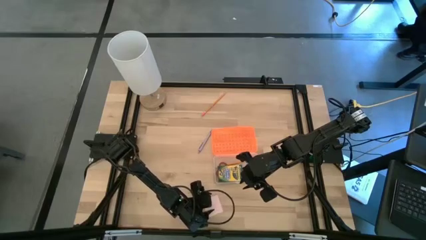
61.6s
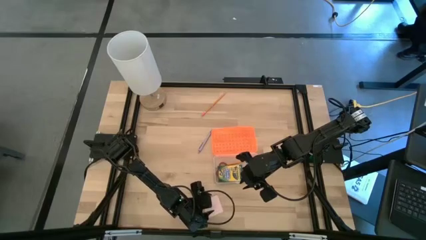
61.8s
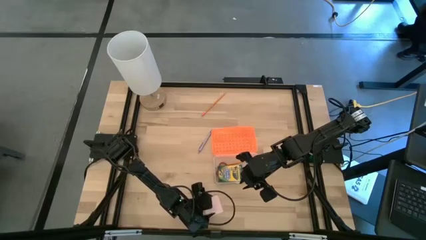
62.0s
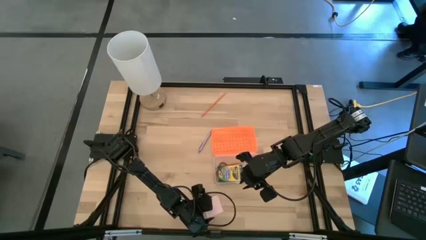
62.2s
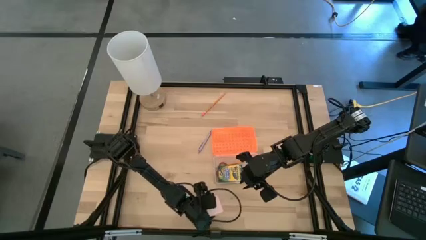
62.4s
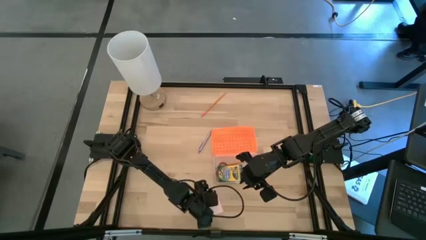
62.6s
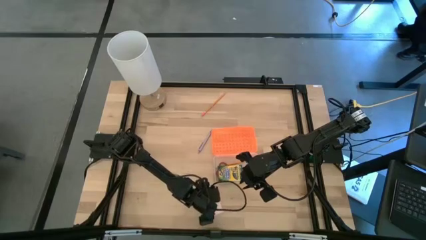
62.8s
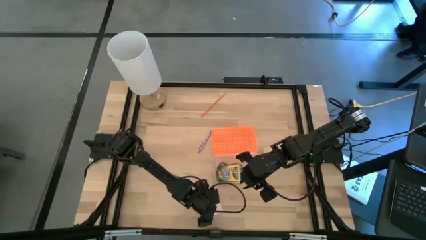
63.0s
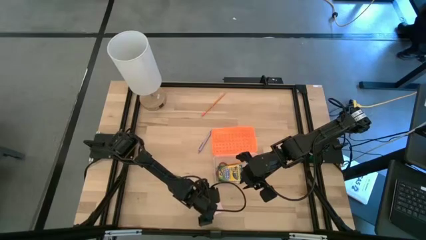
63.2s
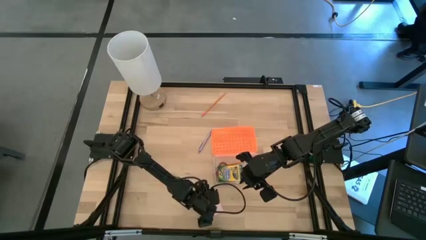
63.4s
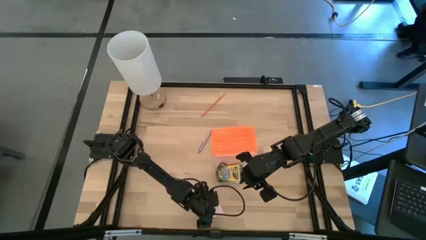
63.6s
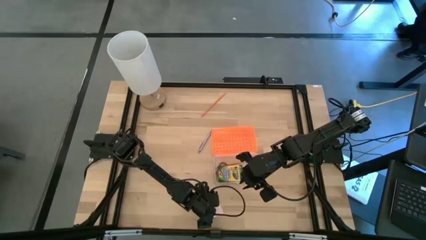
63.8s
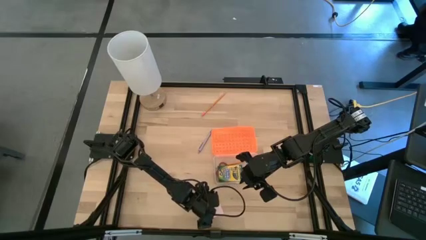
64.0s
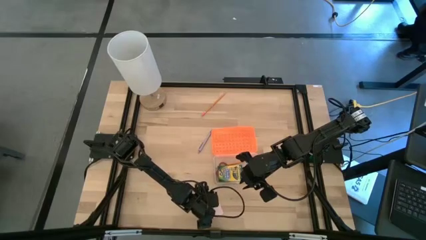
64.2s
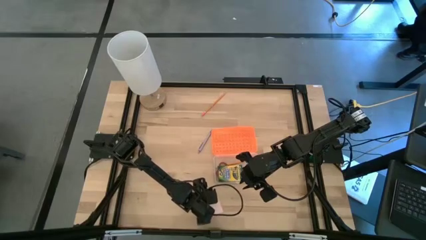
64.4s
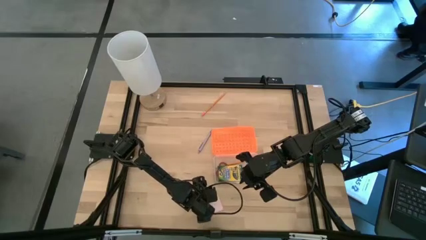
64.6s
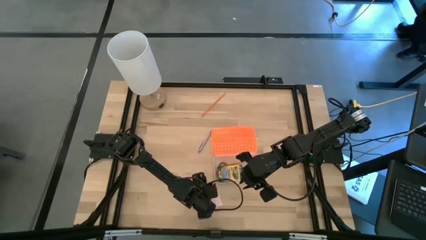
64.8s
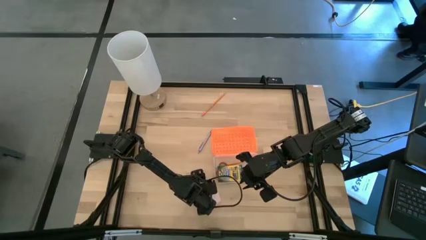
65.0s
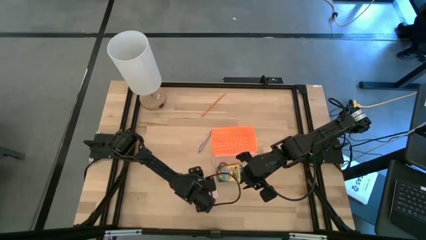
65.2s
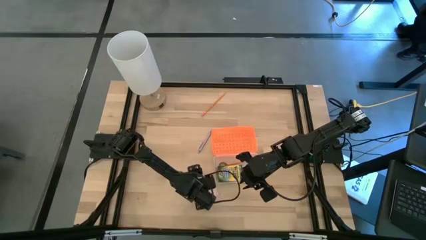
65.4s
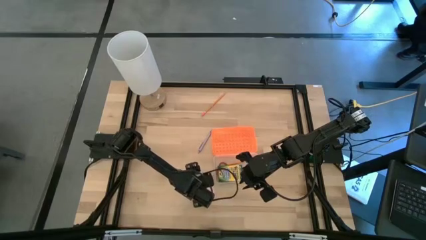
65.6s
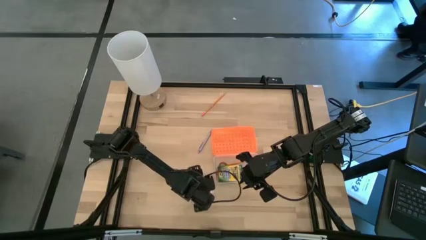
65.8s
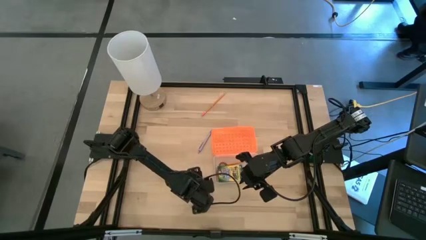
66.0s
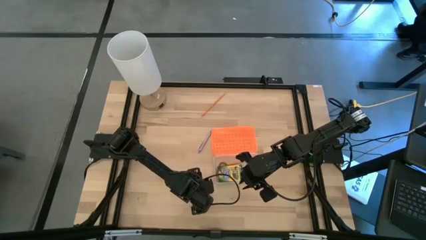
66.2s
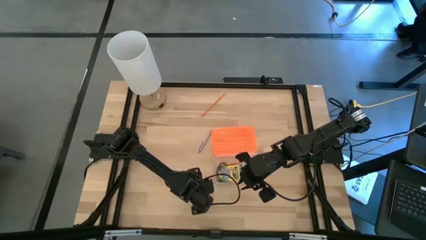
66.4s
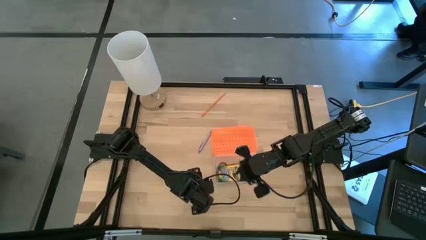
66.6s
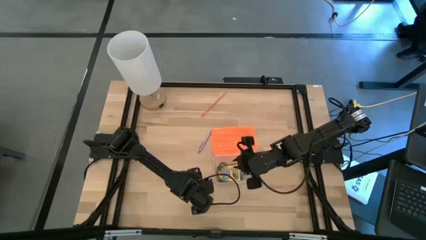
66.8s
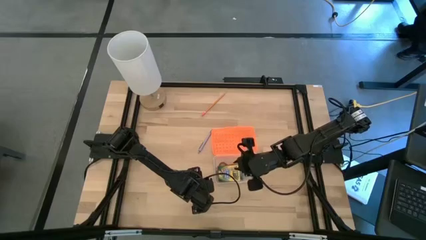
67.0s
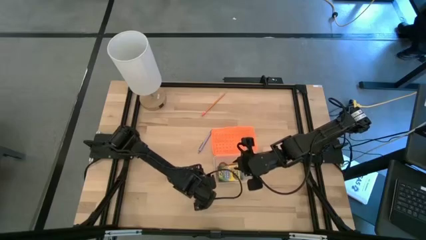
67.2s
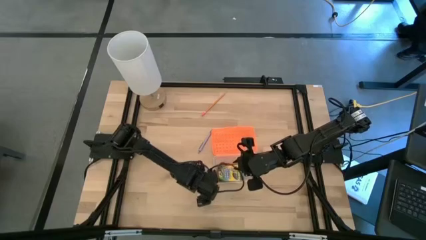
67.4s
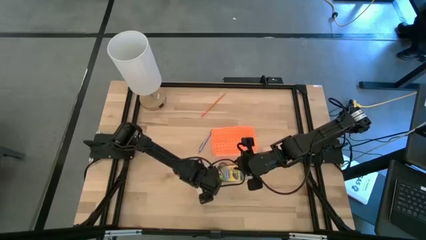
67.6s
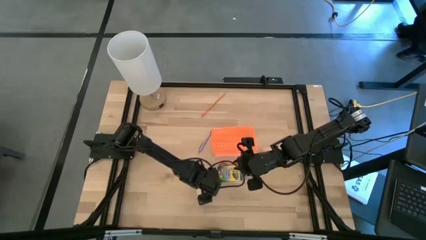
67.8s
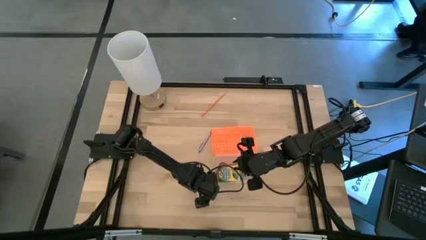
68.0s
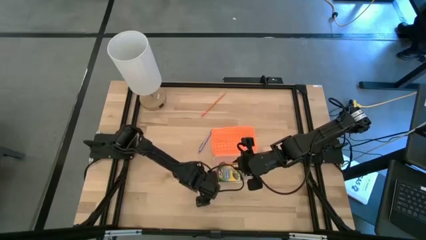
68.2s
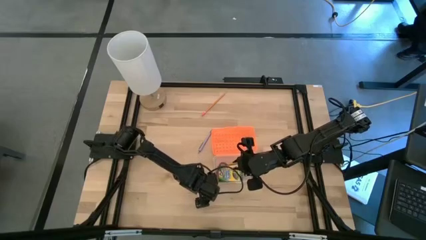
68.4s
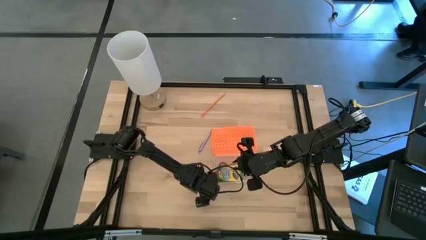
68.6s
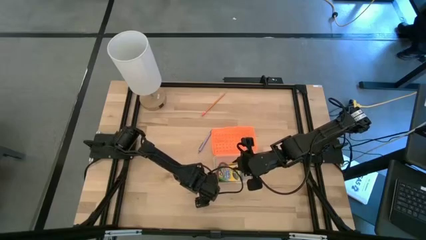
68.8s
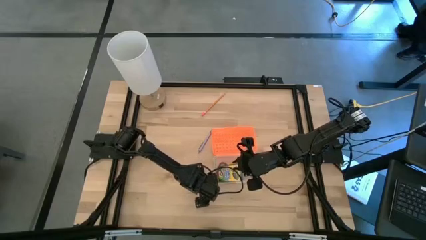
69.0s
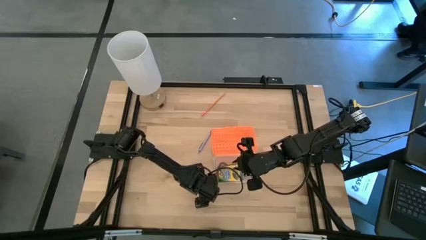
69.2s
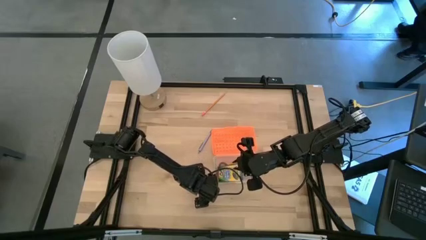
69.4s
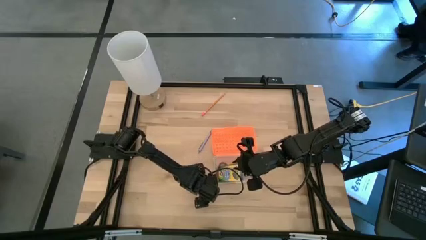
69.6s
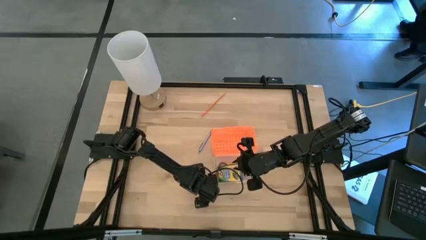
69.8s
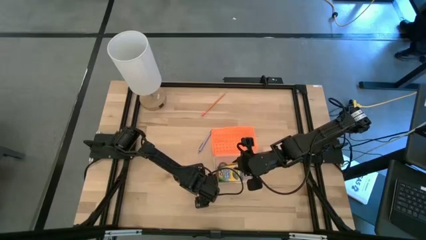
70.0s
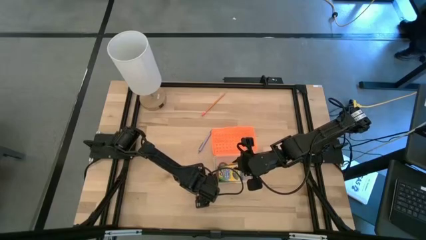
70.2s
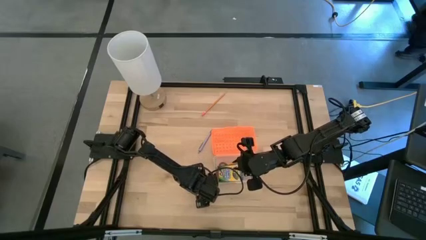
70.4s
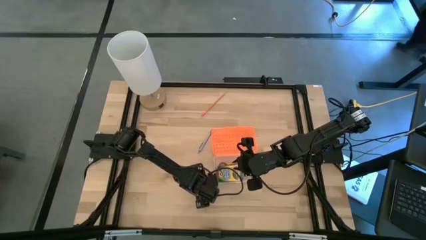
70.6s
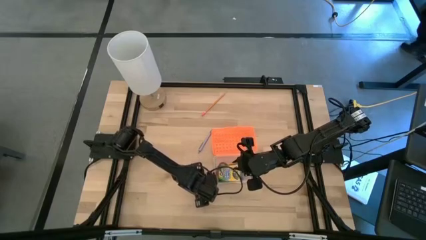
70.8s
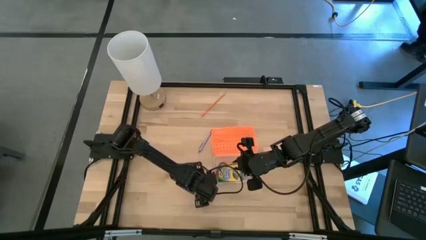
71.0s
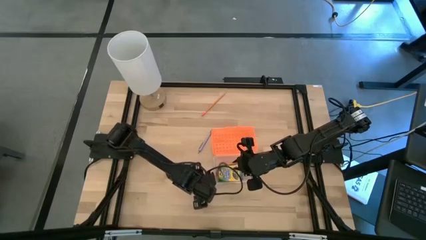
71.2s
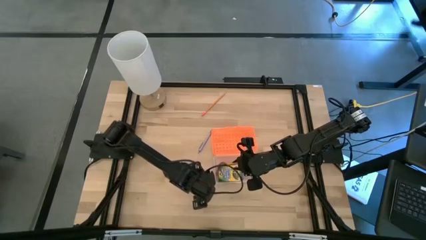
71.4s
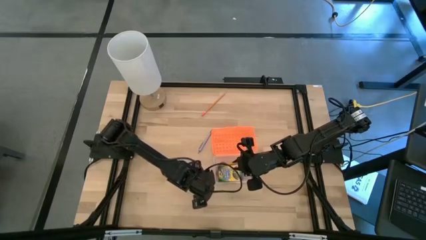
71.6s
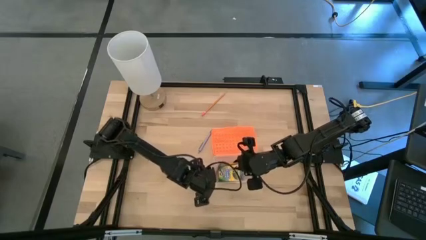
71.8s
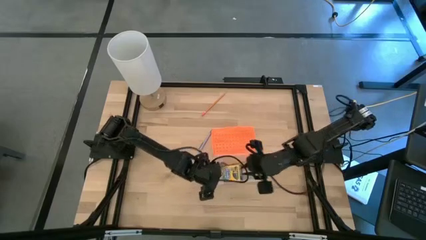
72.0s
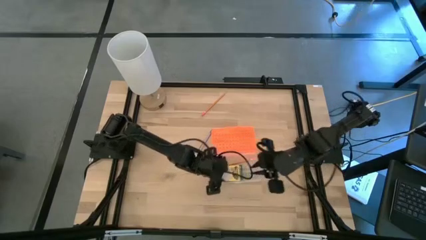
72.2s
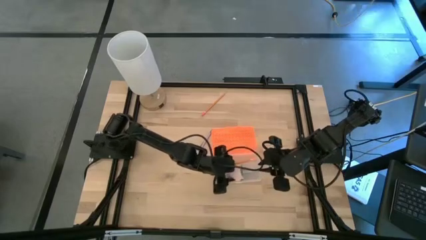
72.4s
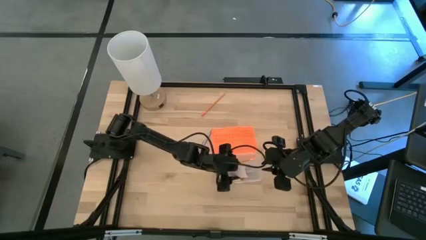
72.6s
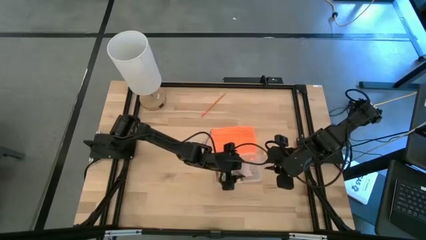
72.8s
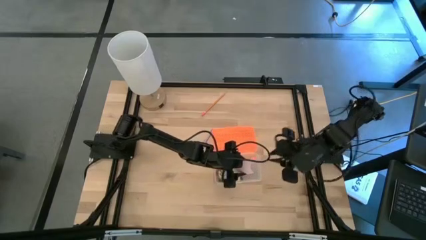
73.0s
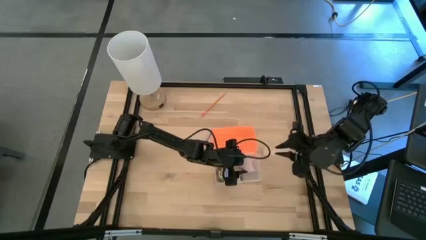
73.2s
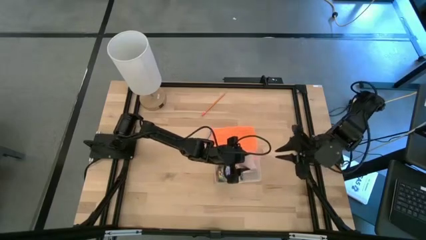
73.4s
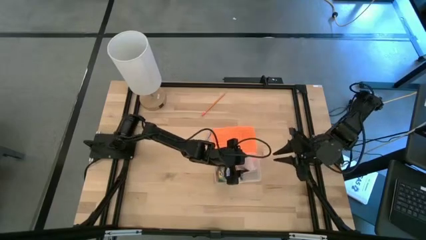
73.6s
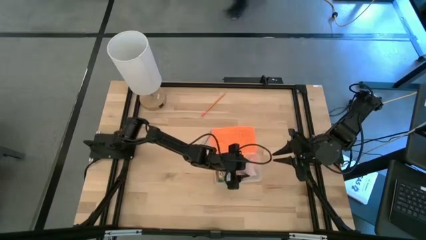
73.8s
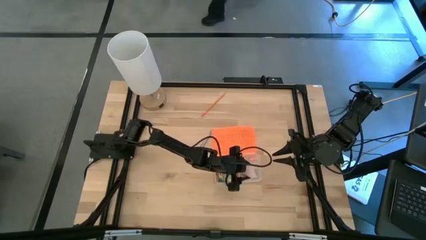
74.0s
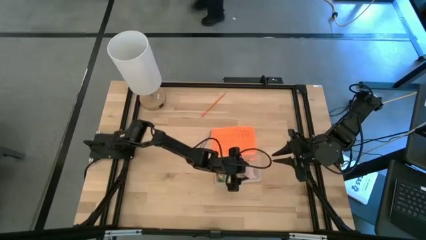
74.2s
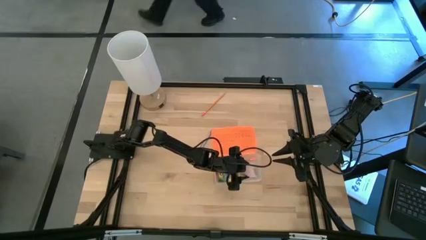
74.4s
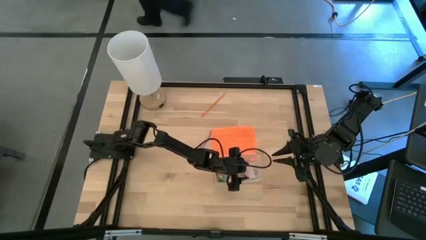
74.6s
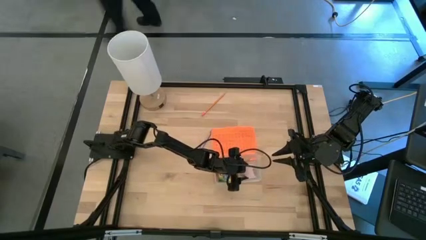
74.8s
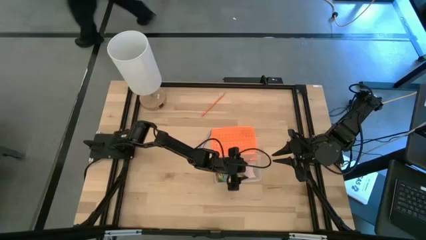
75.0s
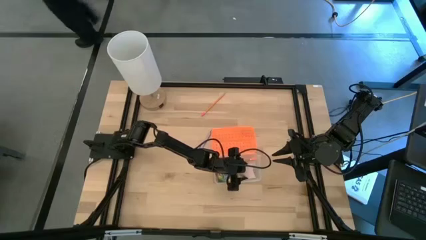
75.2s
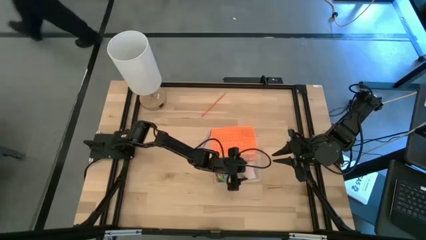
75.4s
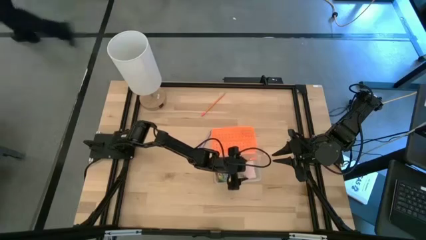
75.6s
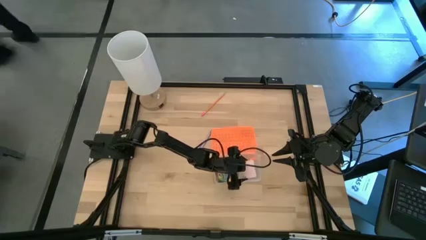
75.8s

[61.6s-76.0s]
Task: Pack school essentials
Put the pink sticky notes into the orange supply box
